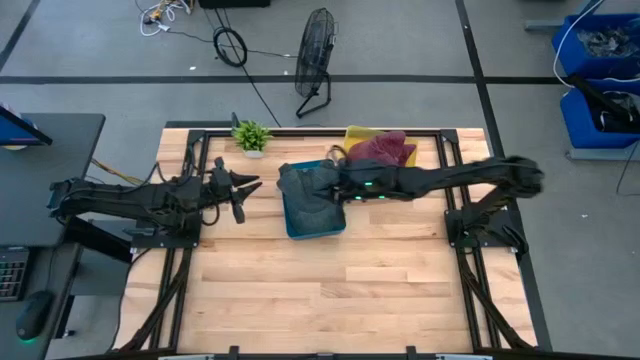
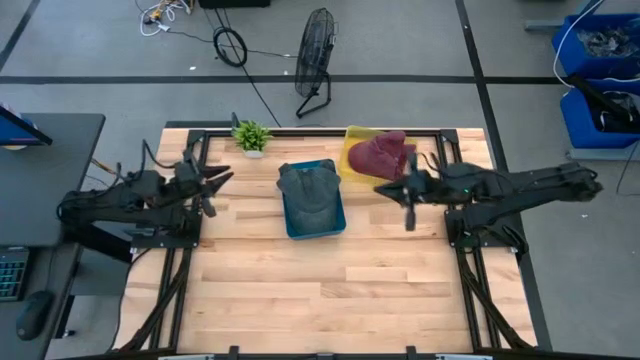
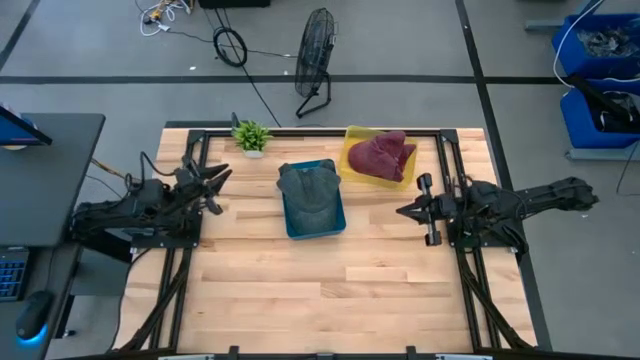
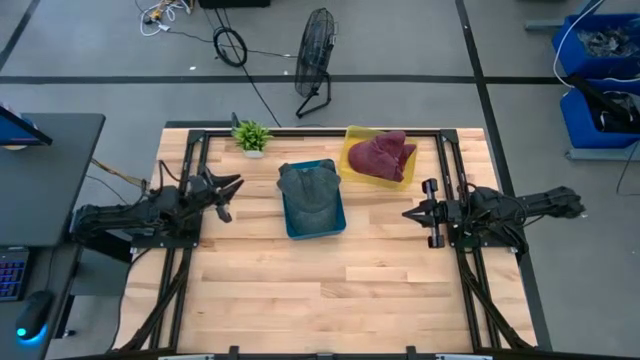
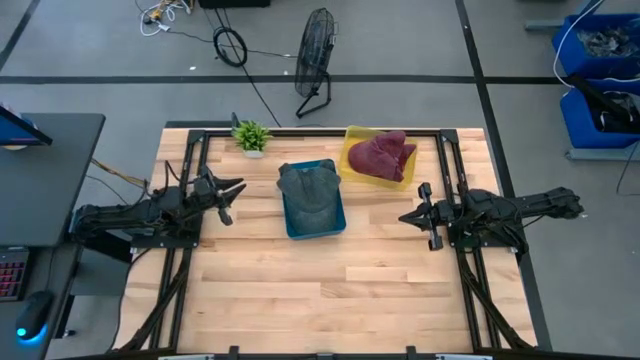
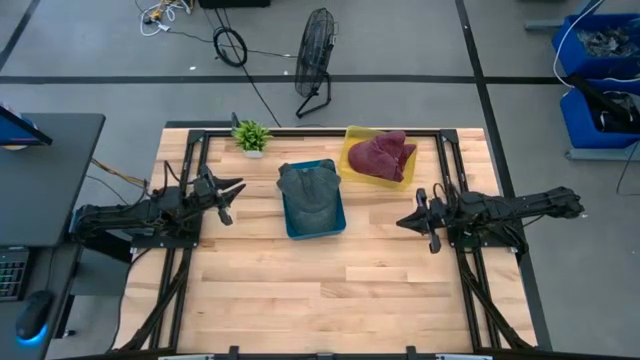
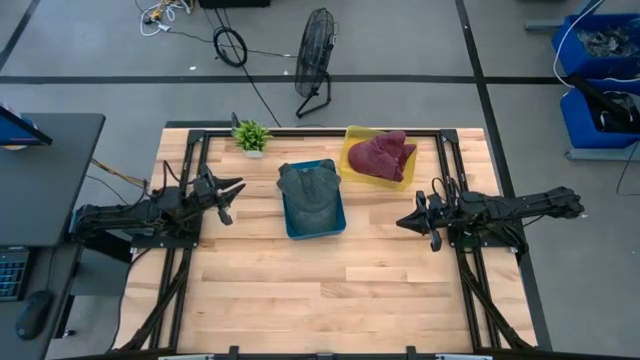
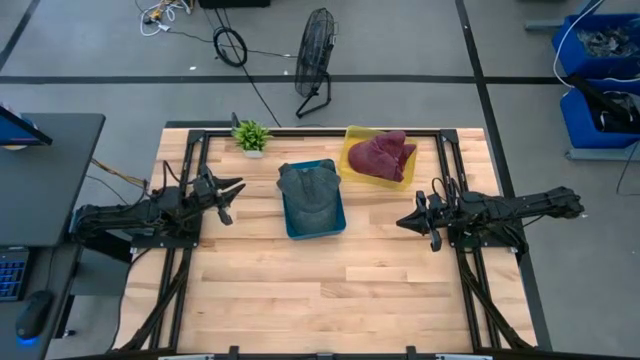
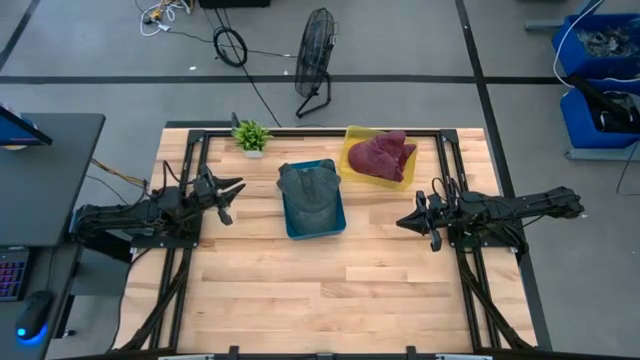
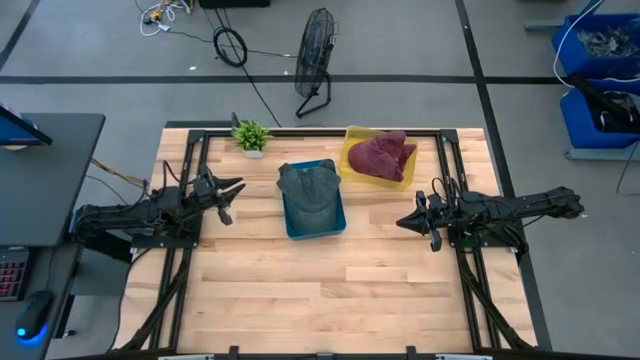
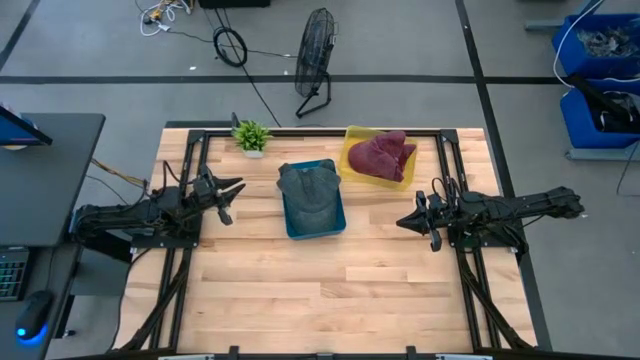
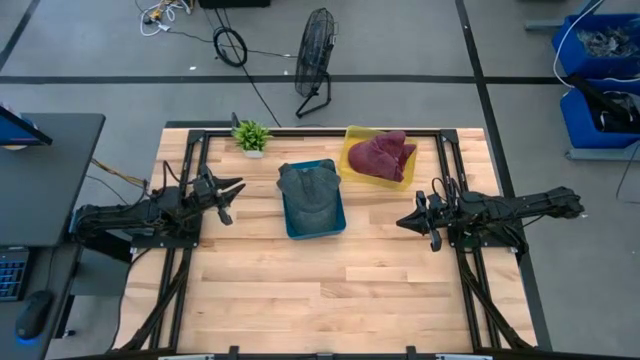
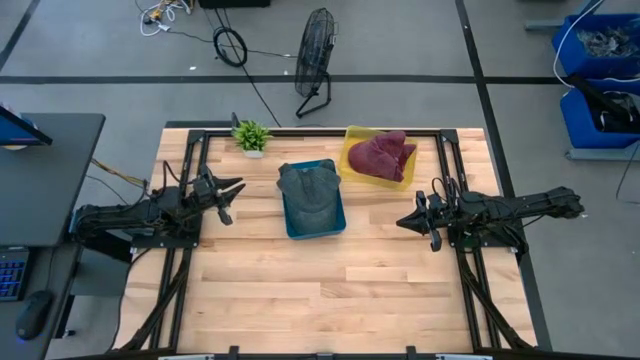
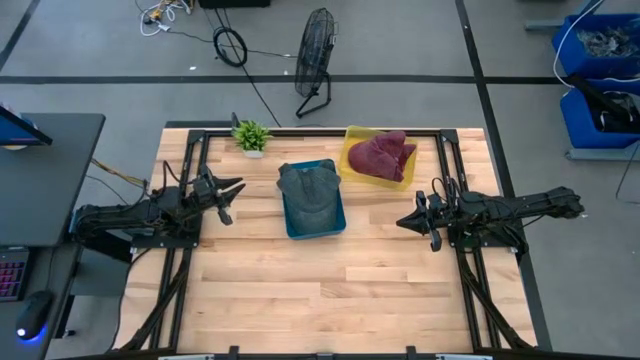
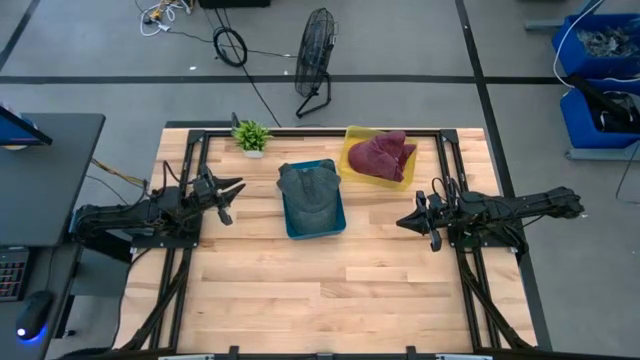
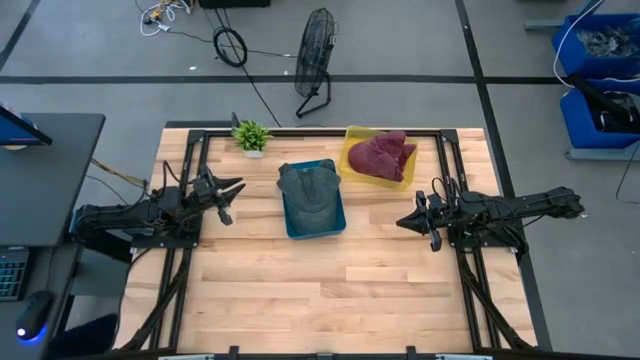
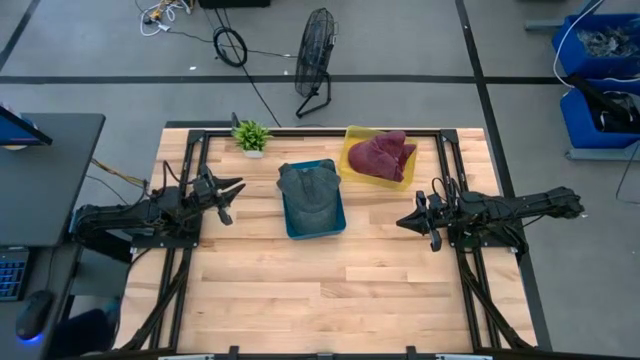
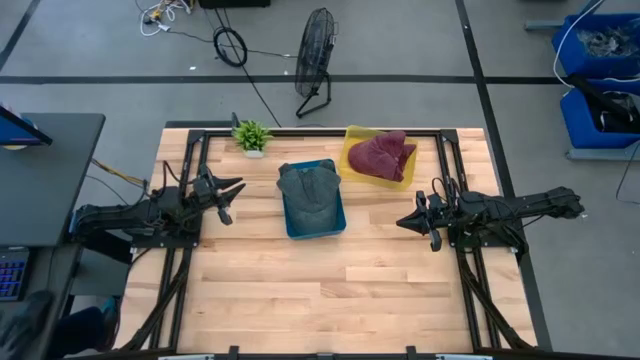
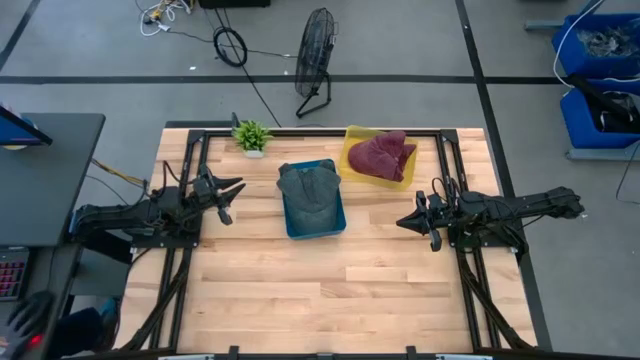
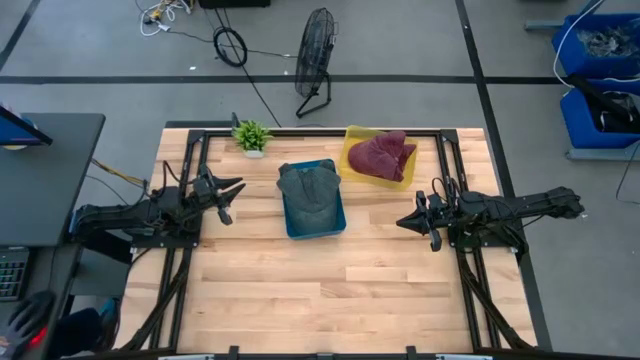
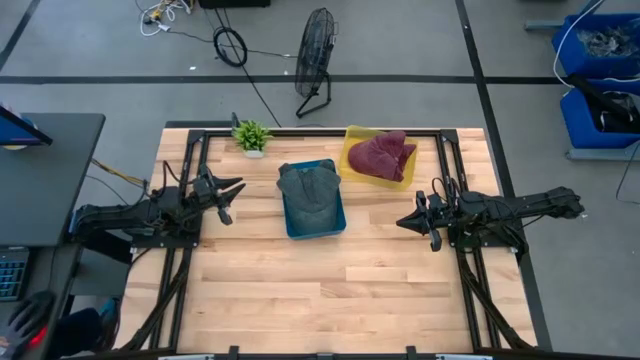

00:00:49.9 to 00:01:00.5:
Task: Pick & Place hat
Return to Home Position

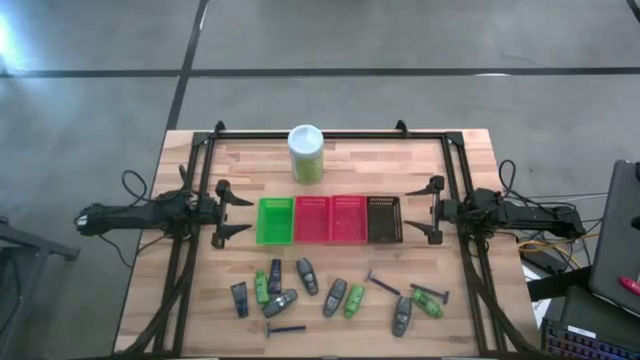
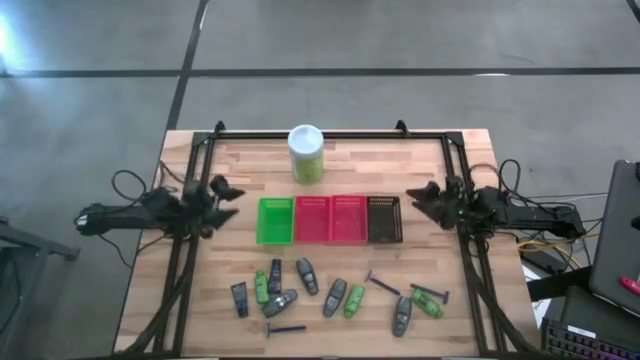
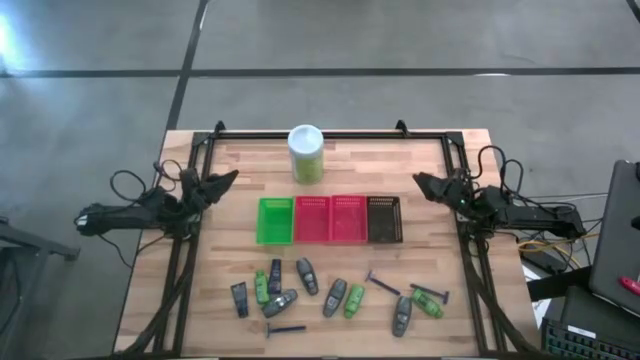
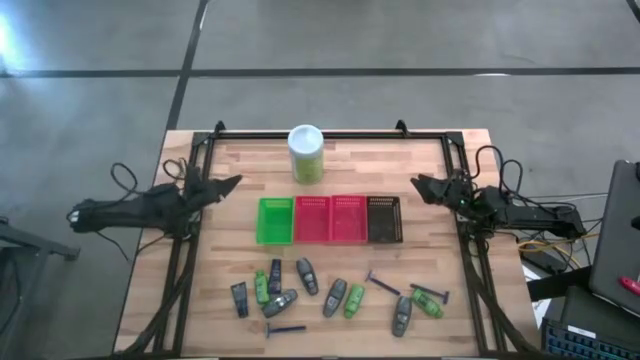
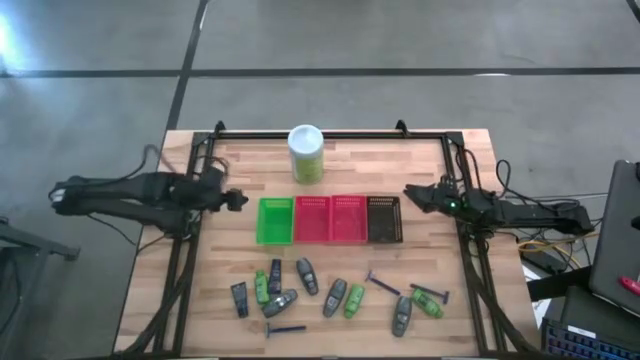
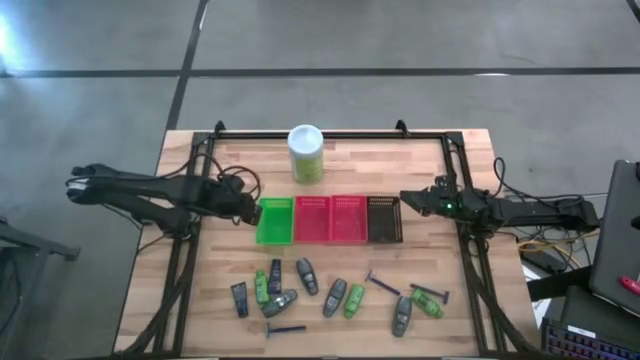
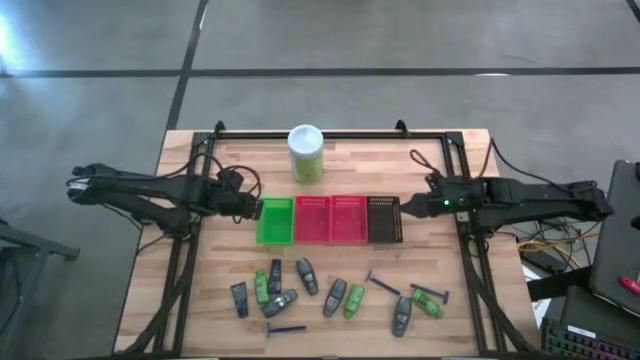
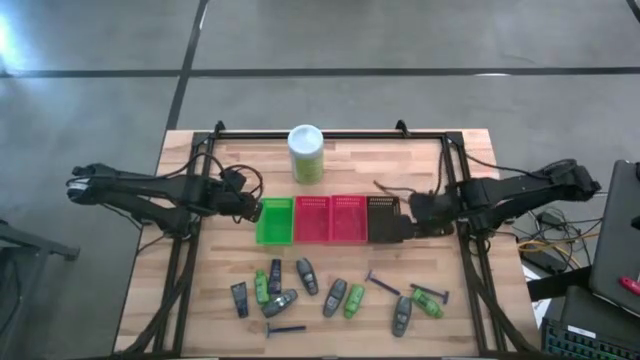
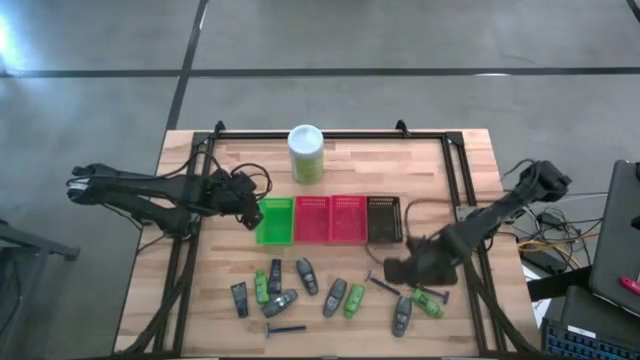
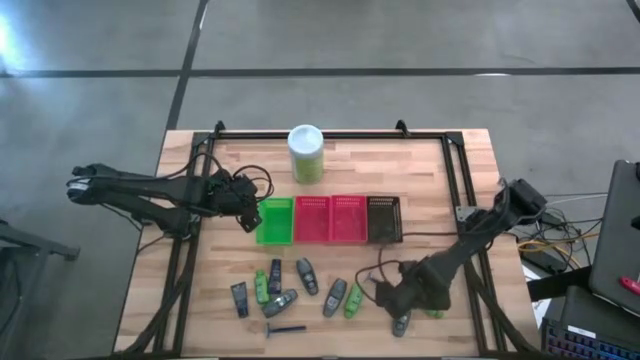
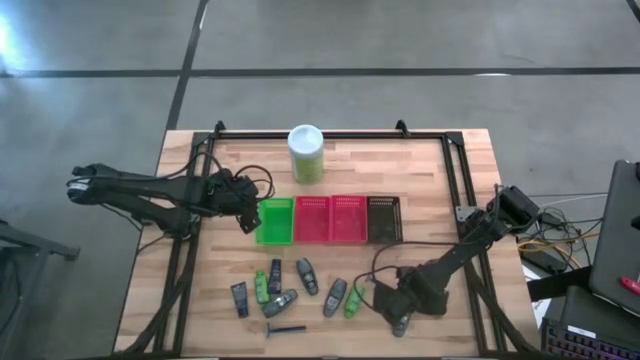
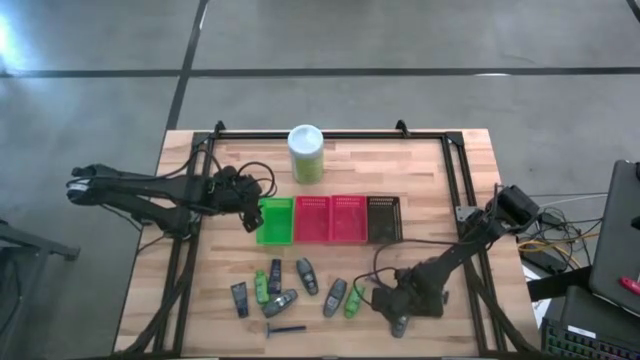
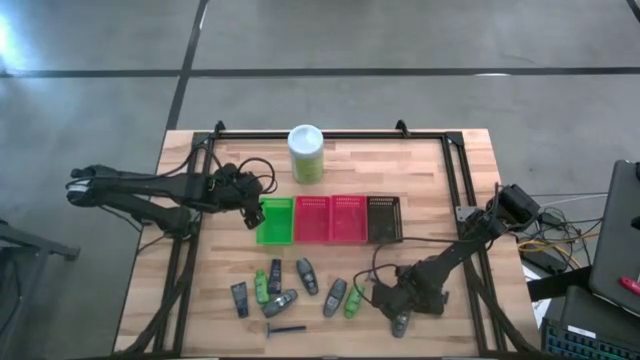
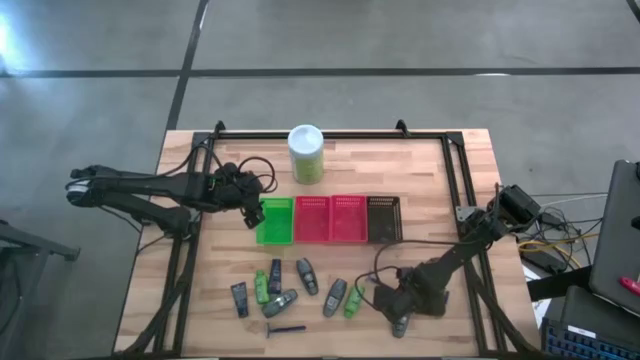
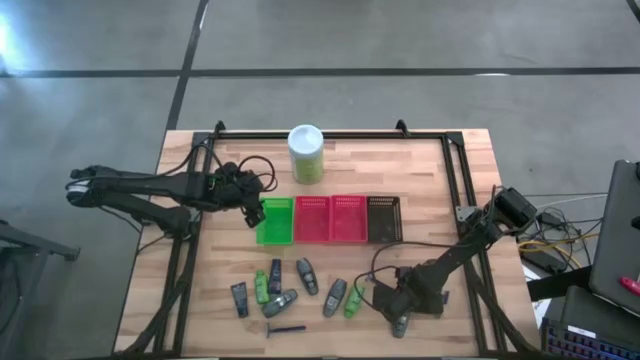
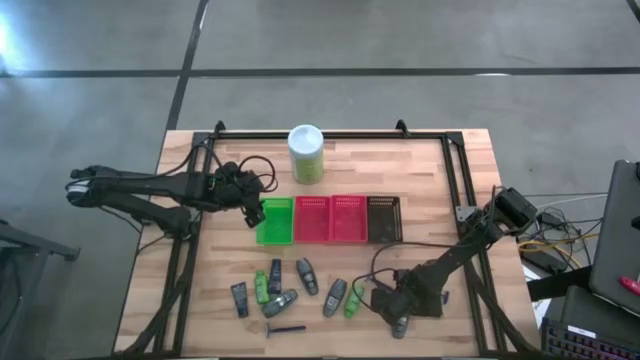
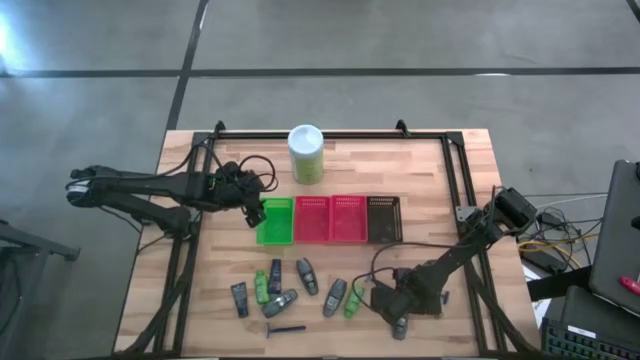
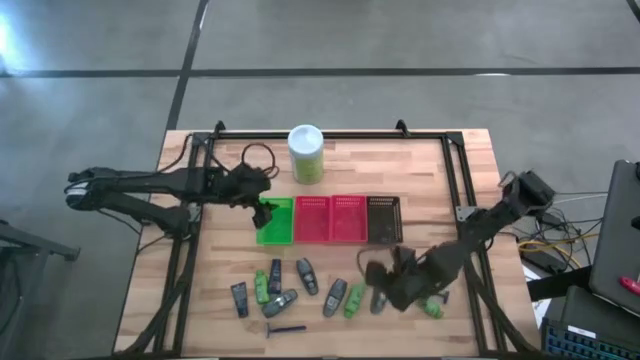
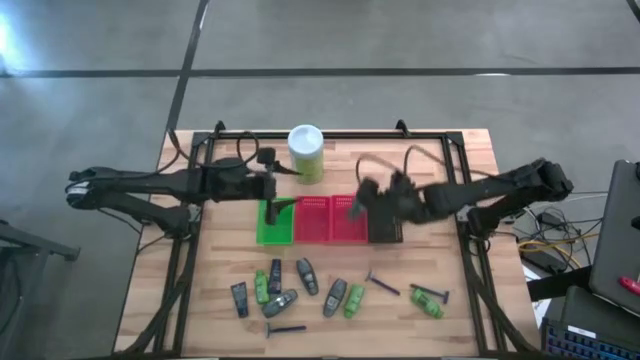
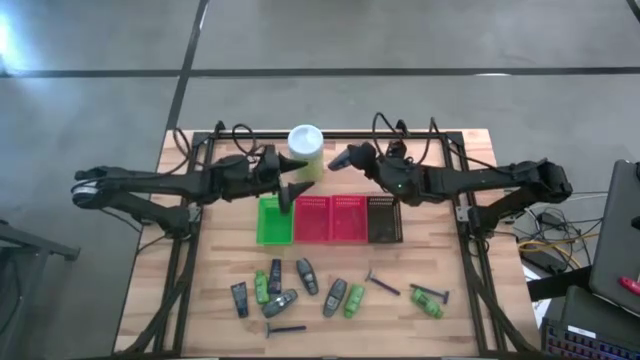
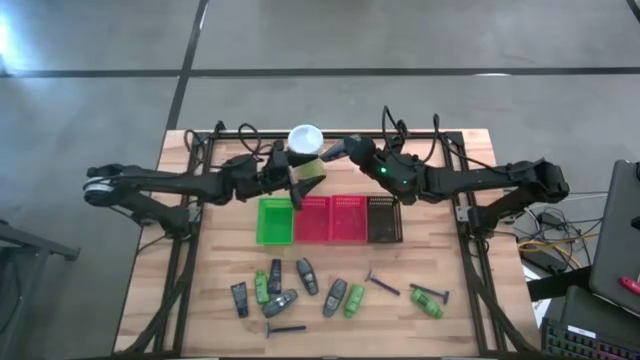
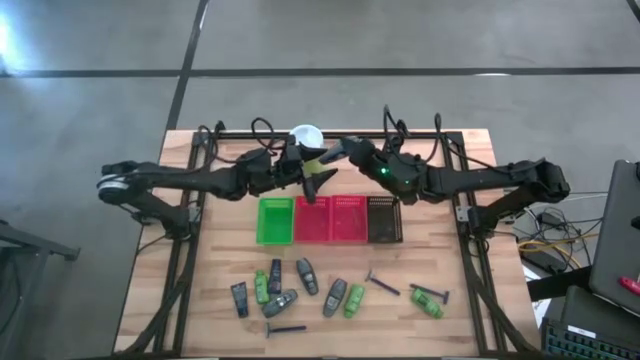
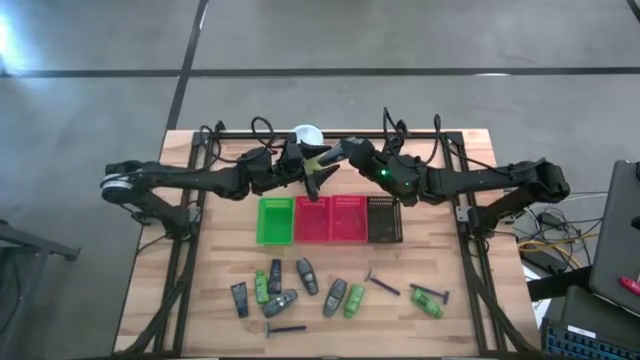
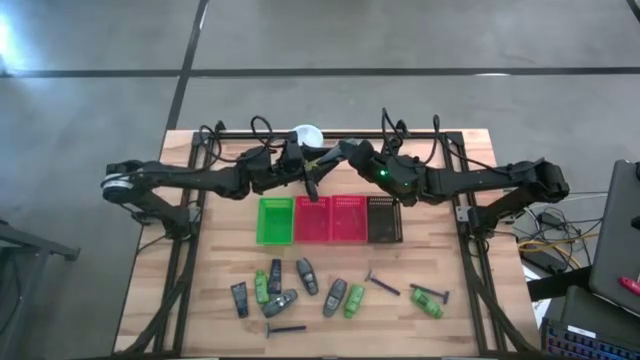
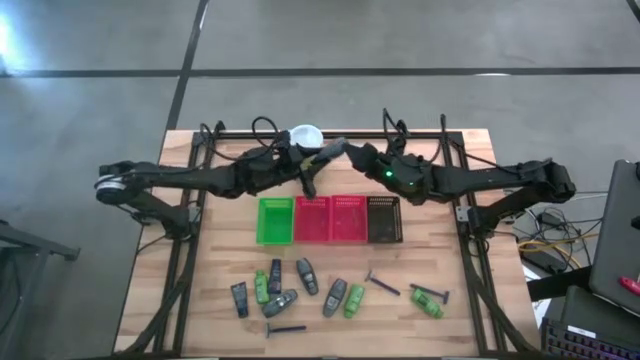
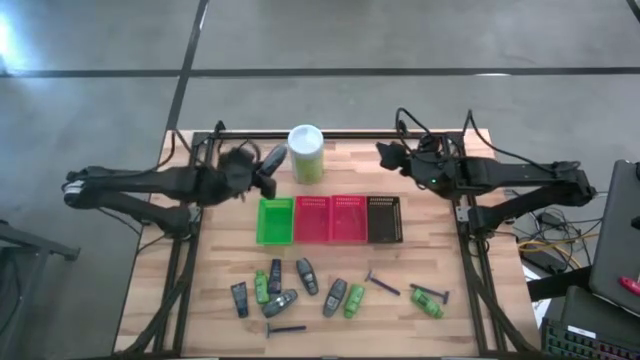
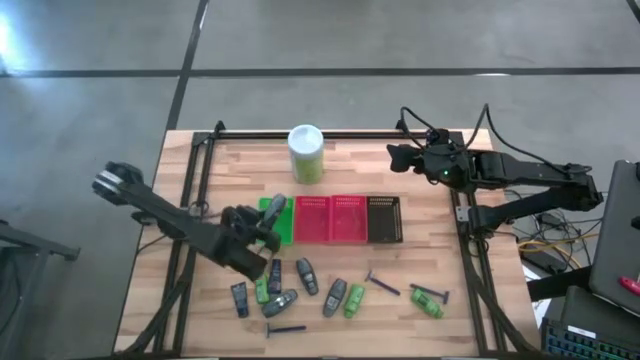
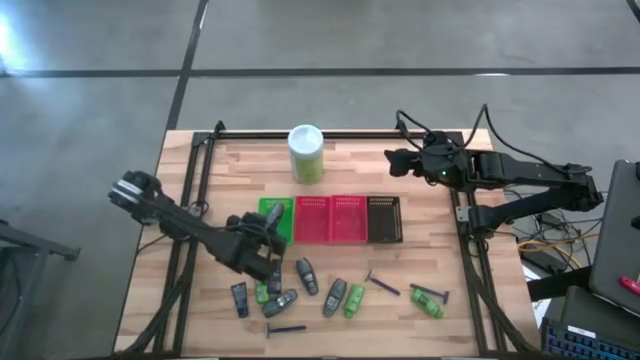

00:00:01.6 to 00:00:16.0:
Task: Pick & Place Travel size toiletries
Put the gray deodorant into the green bin
